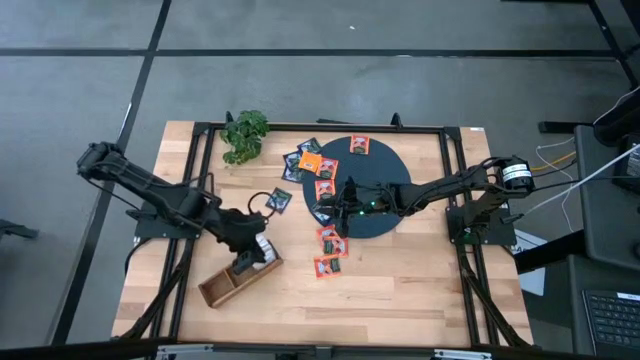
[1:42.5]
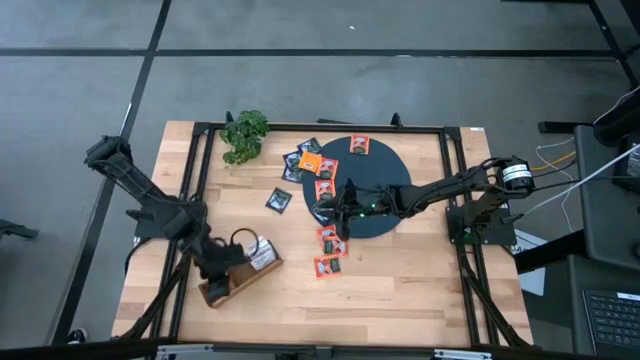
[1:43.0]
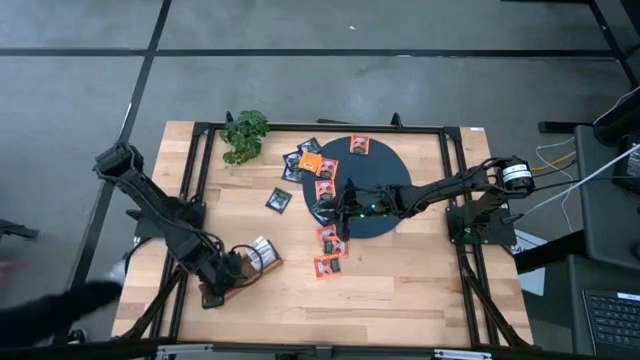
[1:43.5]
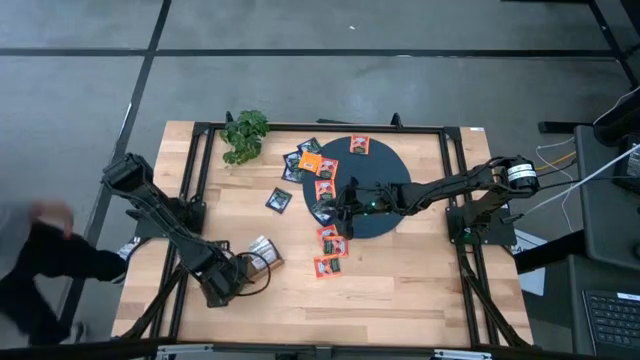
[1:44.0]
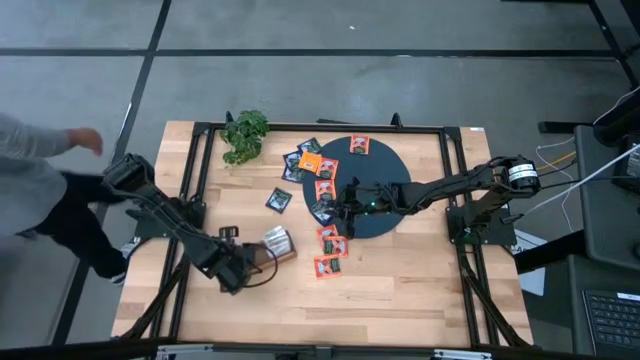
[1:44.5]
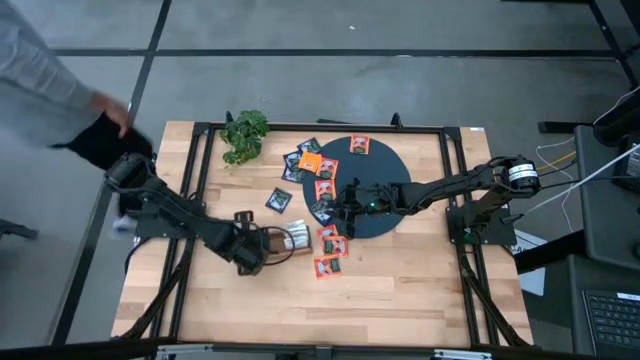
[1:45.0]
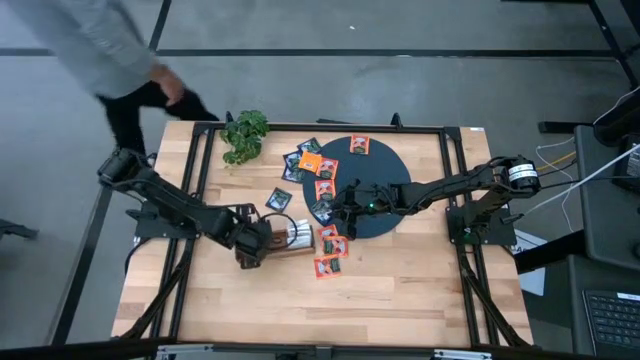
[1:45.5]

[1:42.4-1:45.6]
Task: Pick & Place Tea
Move the wooden organizer to the center of the table

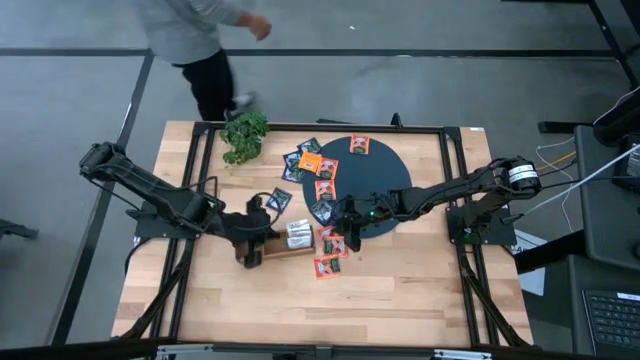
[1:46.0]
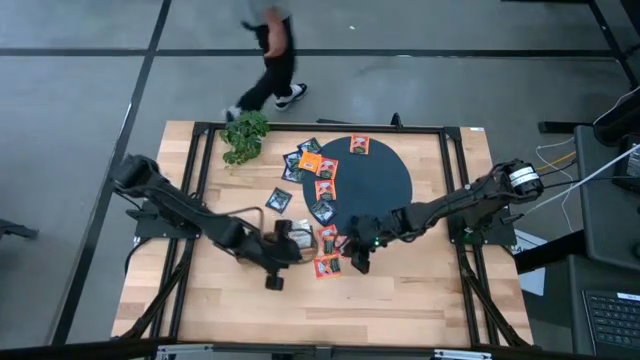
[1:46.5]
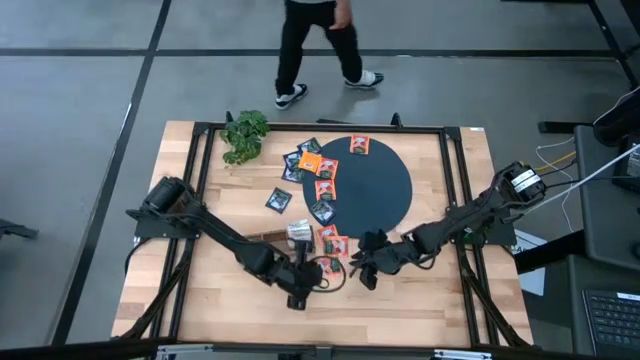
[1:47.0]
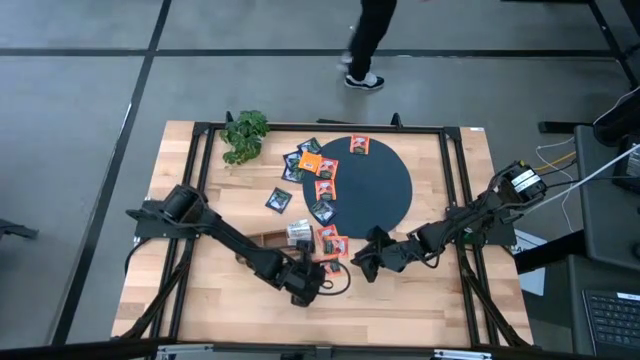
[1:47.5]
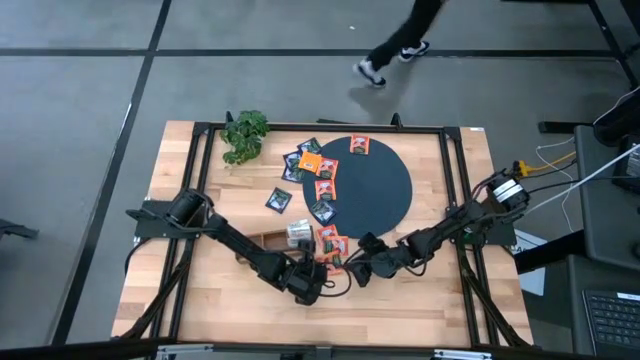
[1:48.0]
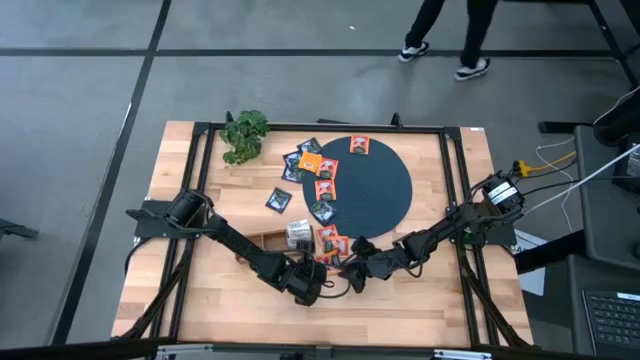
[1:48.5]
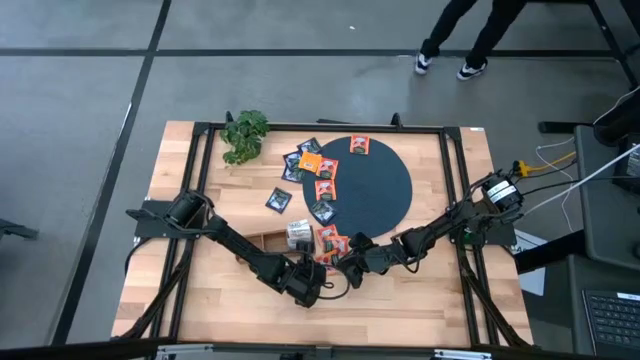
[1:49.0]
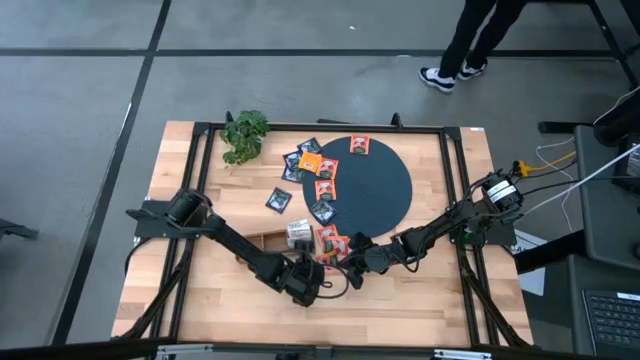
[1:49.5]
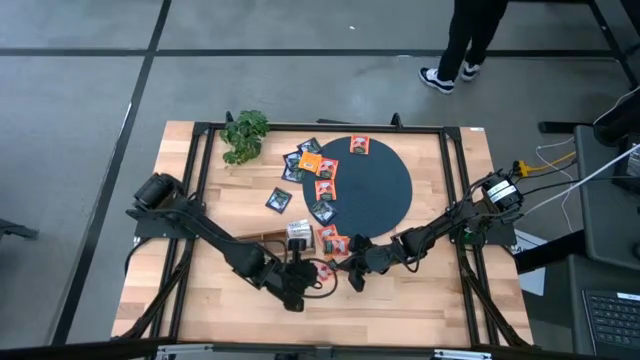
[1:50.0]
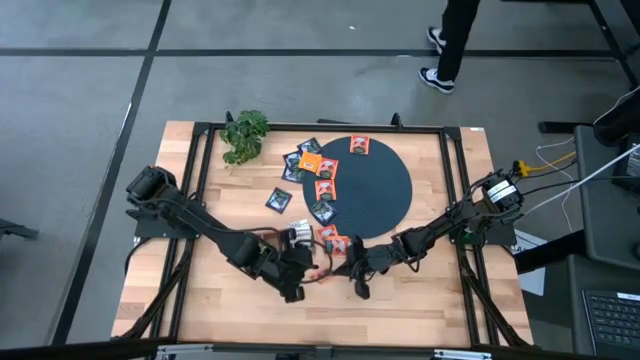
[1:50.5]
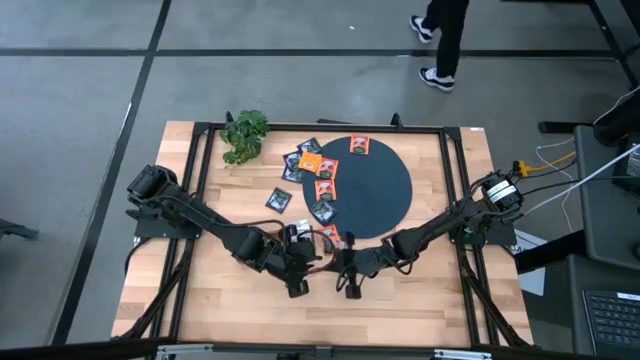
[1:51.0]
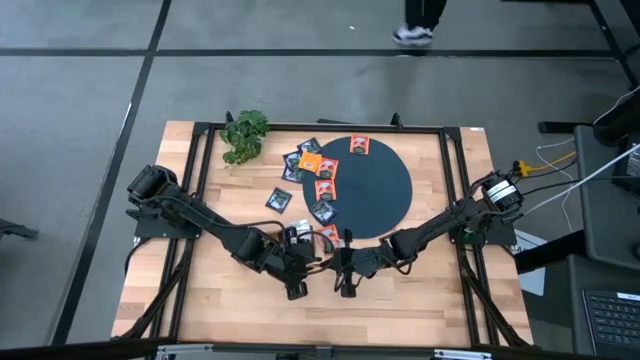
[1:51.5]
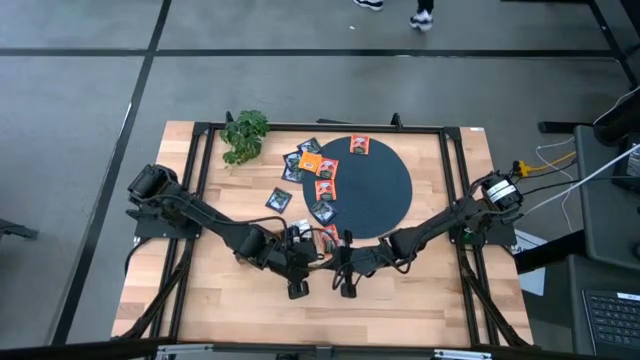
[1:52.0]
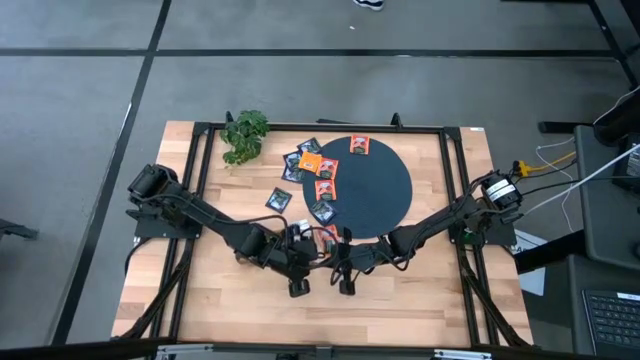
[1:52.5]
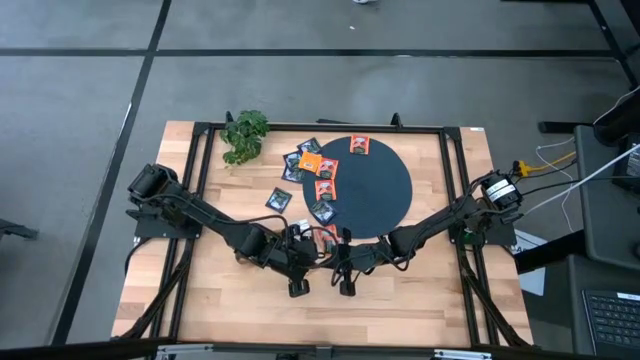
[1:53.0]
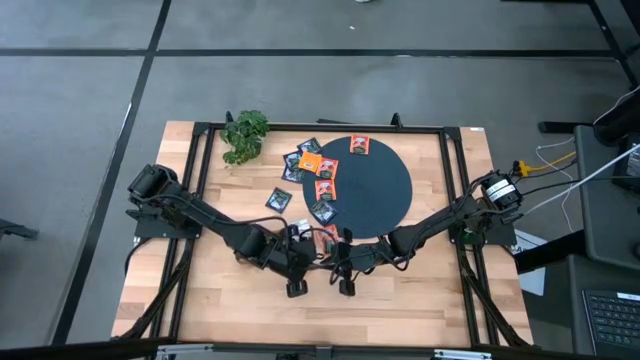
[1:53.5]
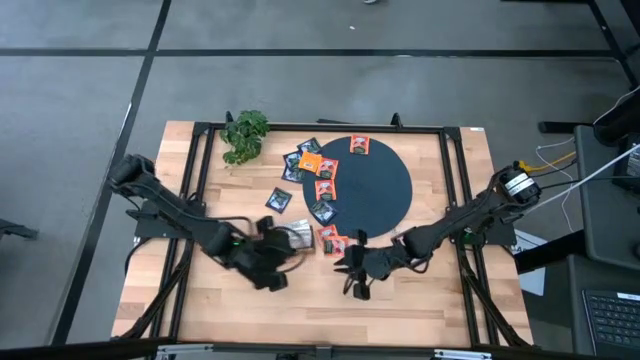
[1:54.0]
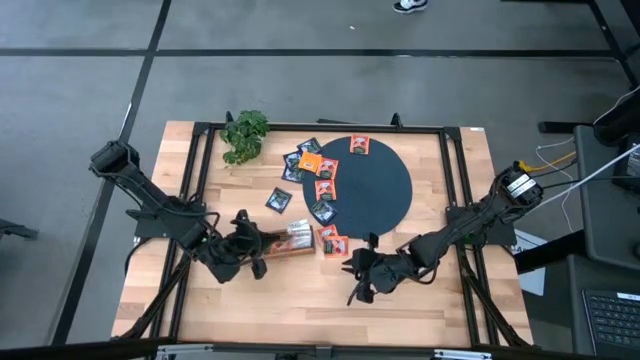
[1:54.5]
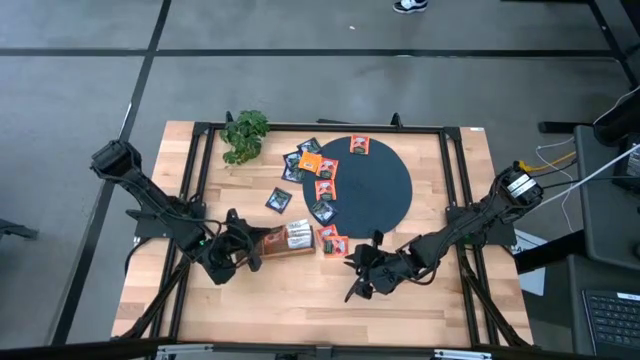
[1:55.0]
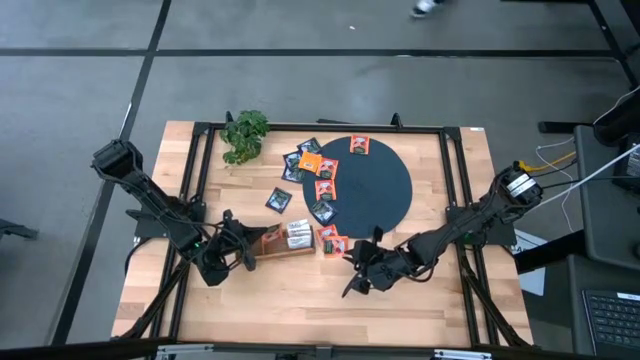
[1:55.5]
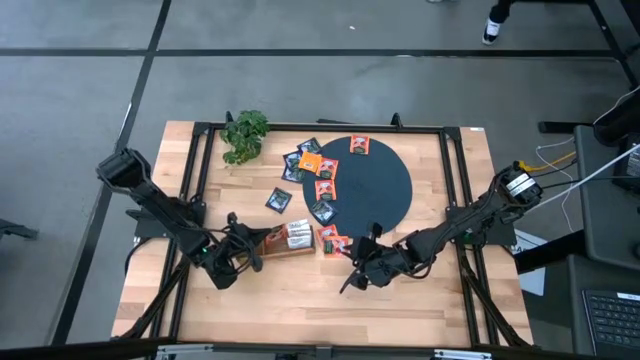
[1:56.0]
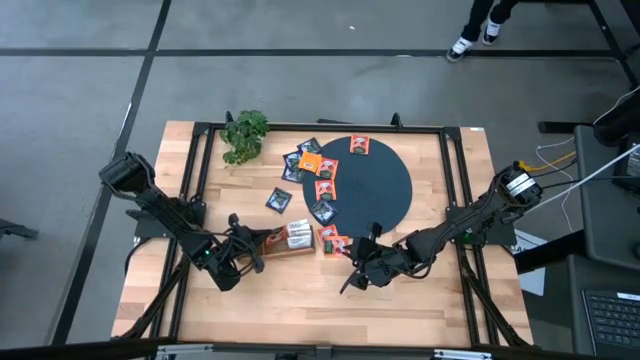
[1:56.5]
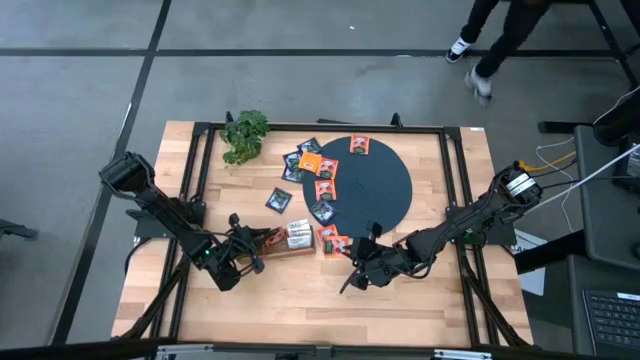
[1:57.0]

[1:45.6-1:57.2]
Put the orange tea bag into the middle section of the wooden organizer

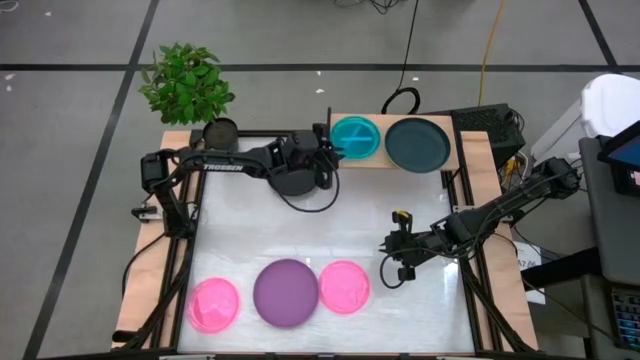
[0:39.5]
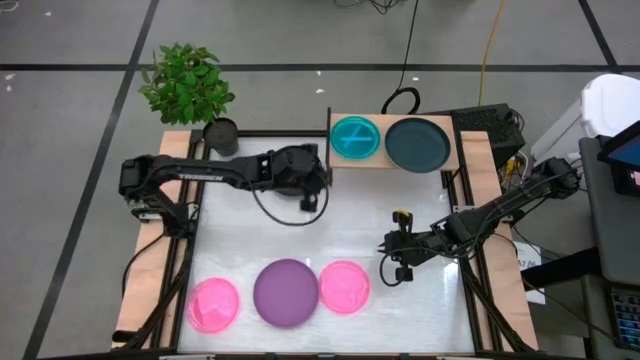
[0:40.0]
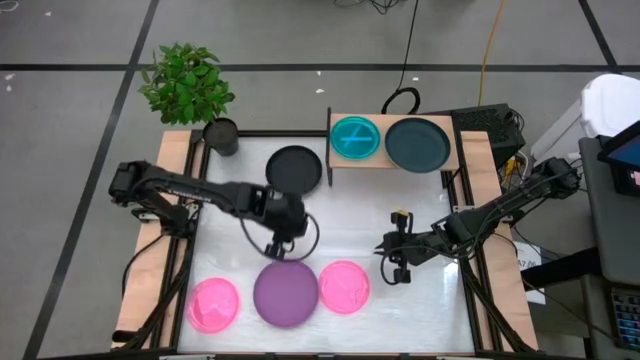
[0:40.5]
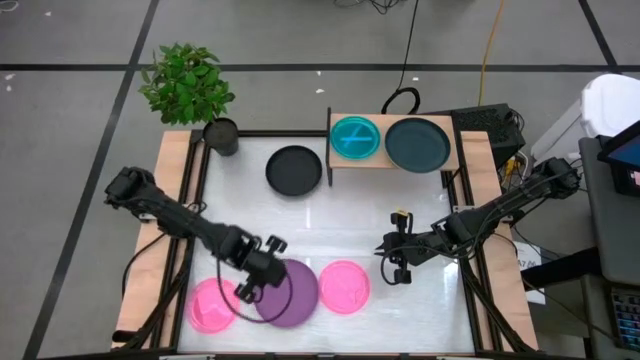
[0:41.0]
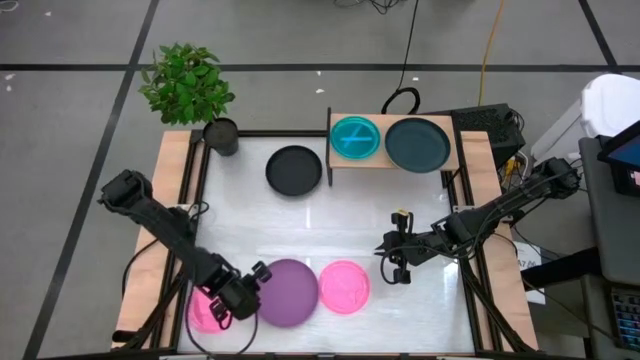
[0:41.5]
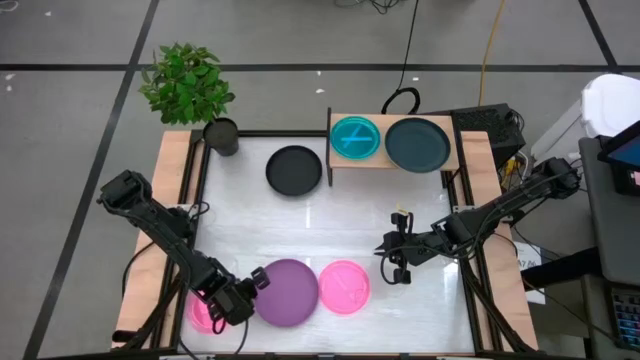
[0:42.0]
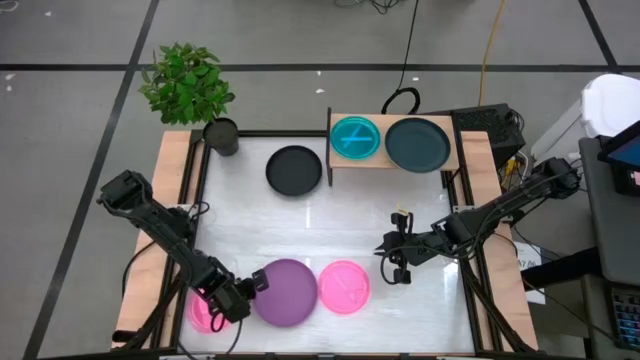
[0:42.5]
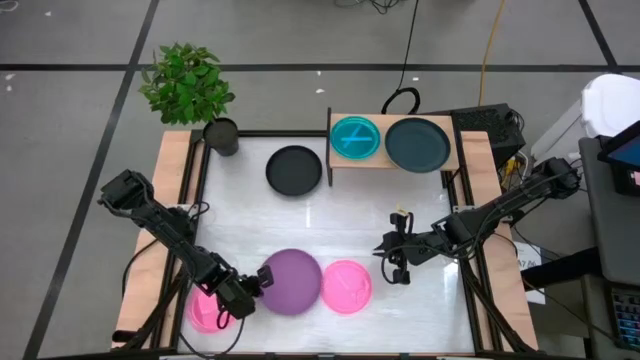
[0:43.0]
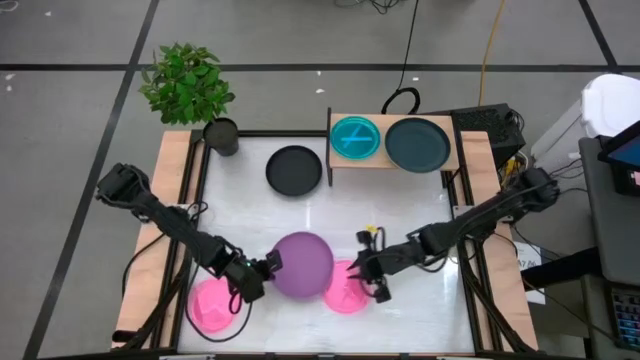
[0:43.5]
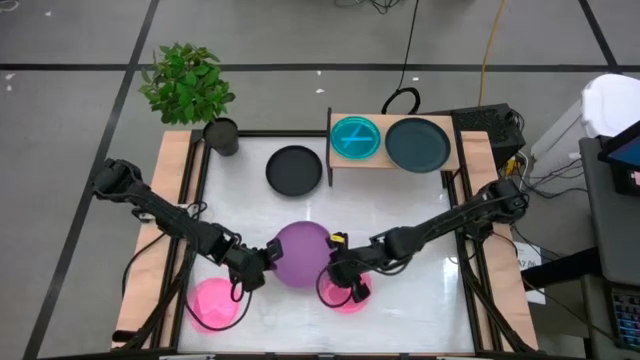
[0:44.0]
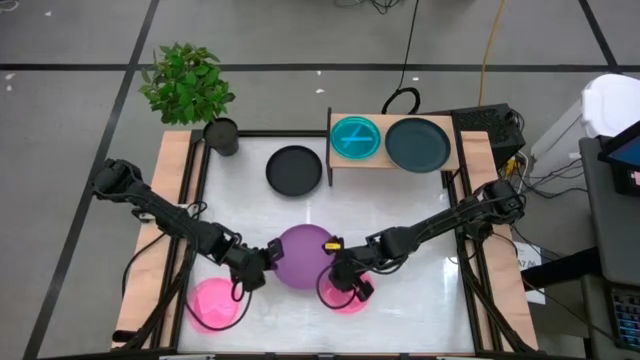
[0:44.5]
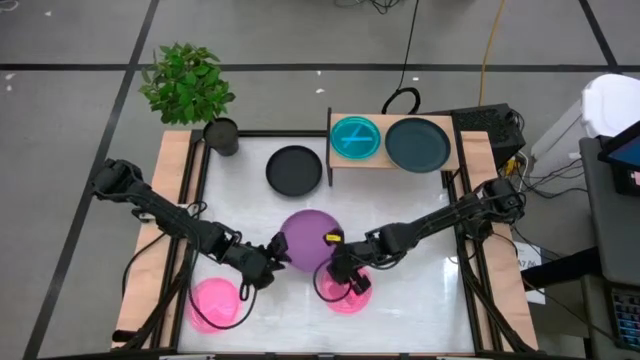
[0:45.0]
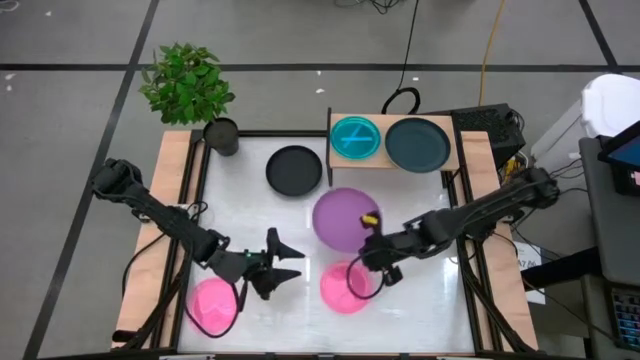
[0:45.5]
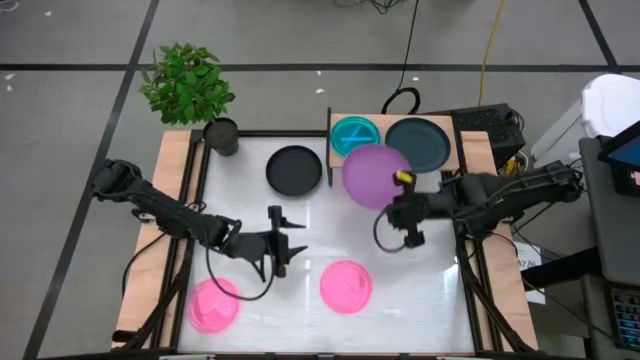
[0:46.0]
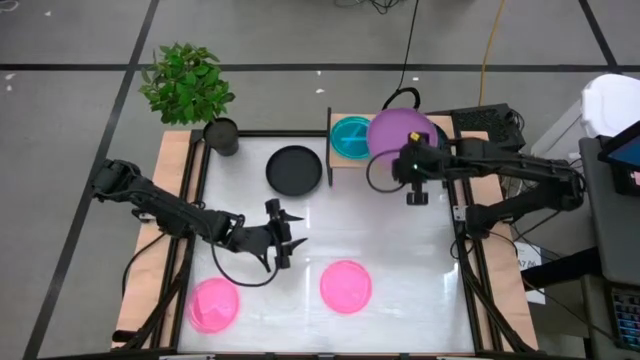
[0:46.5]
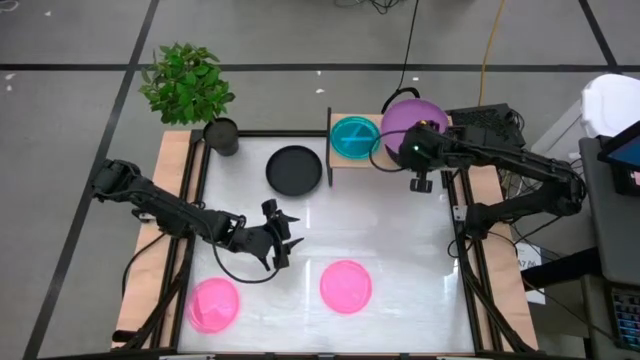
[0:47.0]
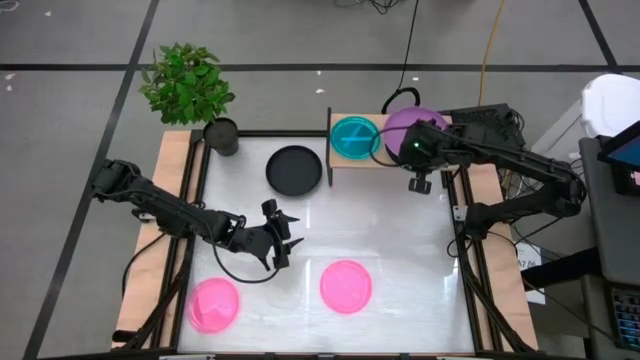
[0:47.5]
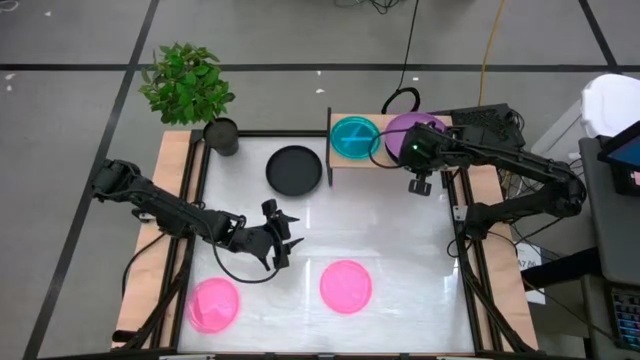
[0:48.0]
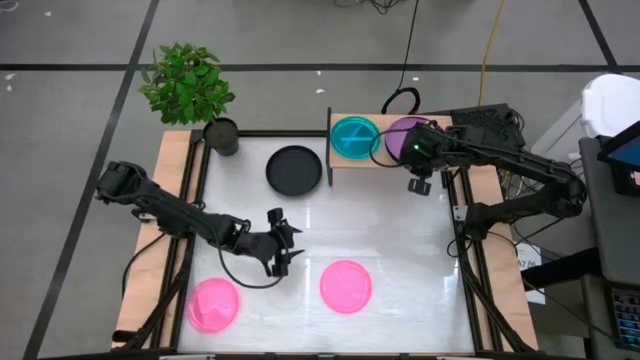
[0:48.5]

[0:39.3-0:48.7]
Task: Place and stack plates onto a shelf
Stack the big violet plate on top of the big black plate on the shelf
